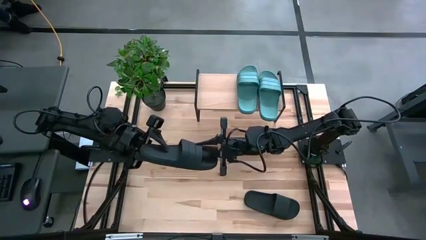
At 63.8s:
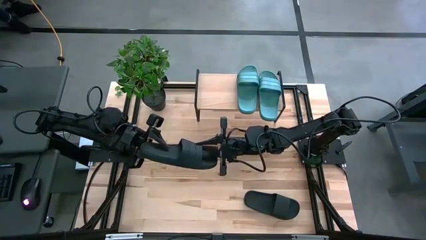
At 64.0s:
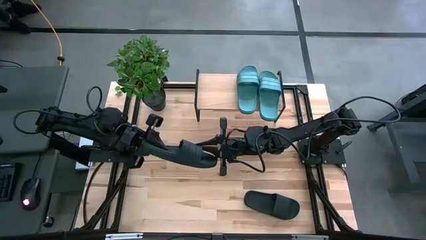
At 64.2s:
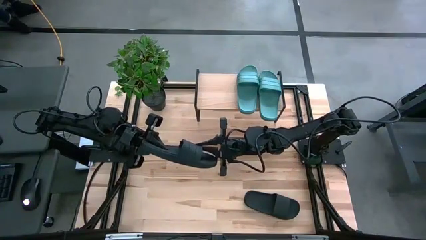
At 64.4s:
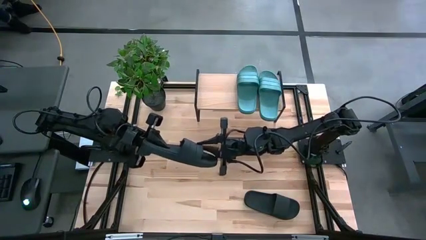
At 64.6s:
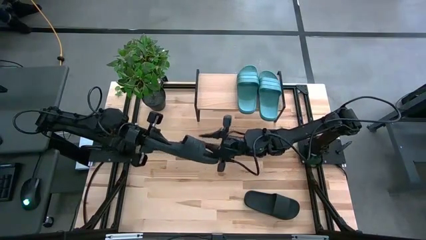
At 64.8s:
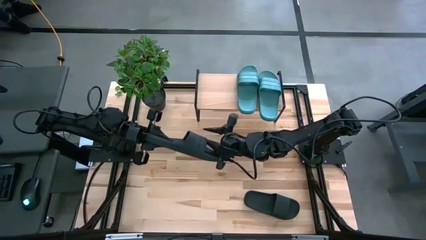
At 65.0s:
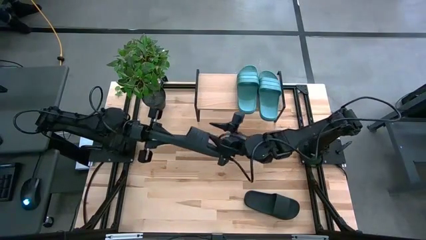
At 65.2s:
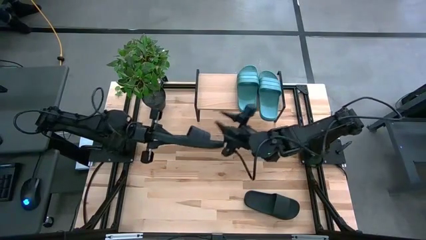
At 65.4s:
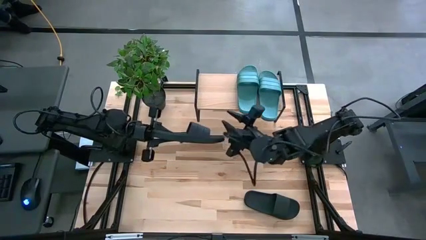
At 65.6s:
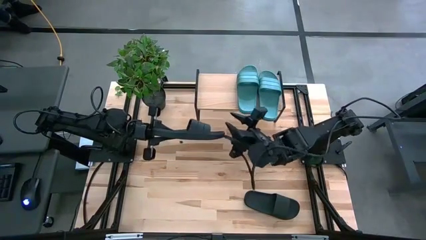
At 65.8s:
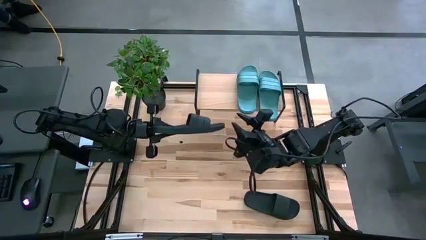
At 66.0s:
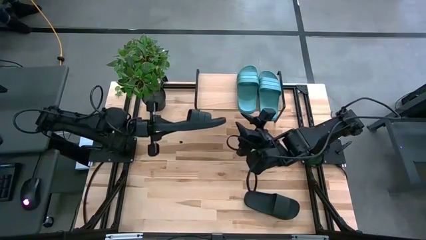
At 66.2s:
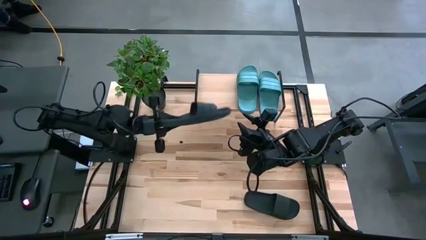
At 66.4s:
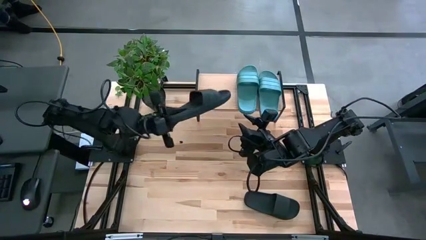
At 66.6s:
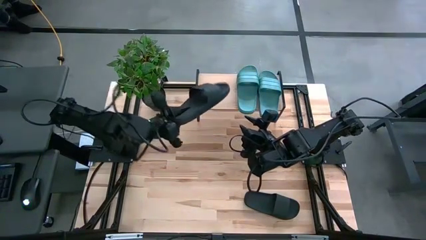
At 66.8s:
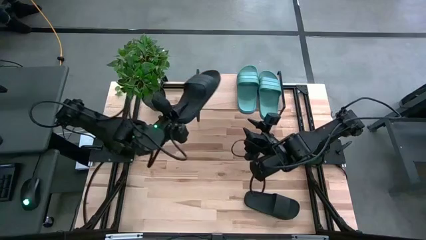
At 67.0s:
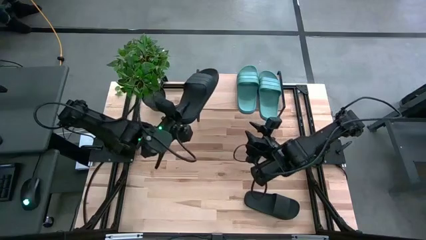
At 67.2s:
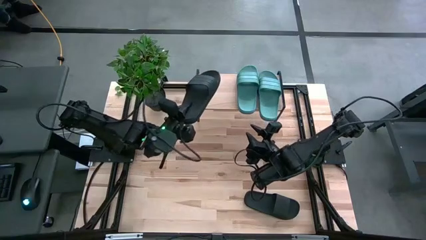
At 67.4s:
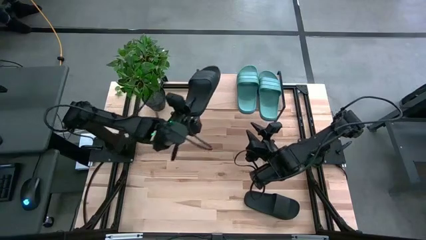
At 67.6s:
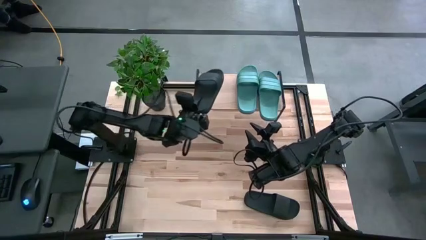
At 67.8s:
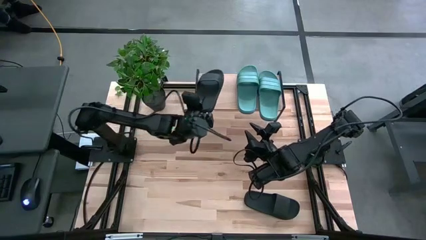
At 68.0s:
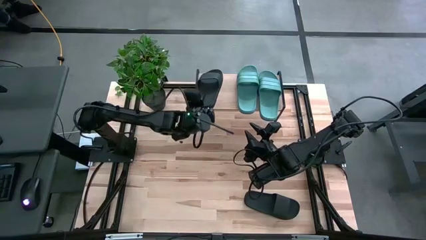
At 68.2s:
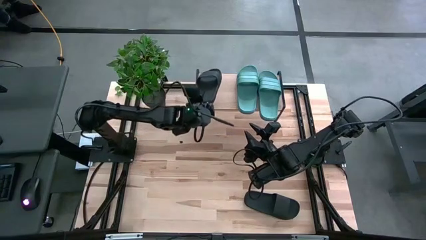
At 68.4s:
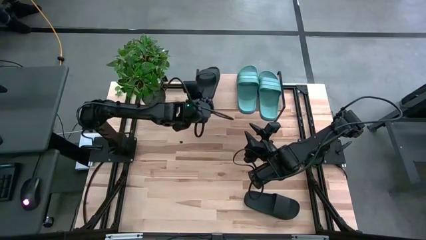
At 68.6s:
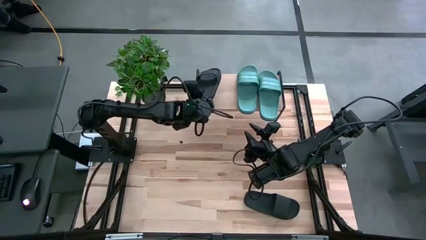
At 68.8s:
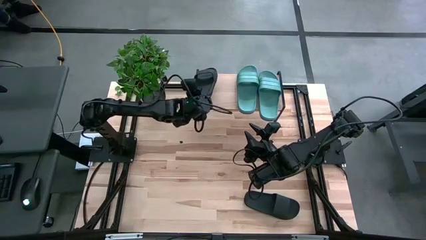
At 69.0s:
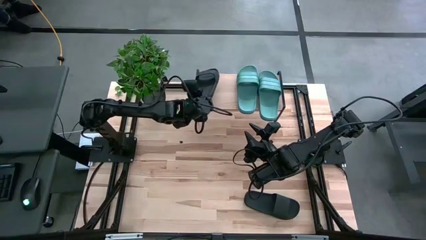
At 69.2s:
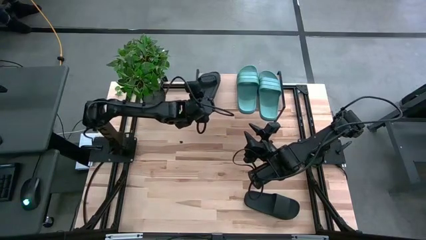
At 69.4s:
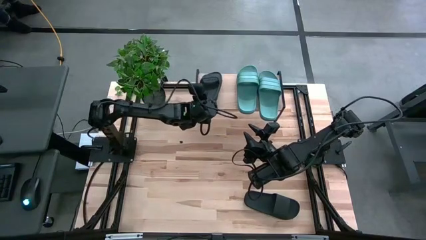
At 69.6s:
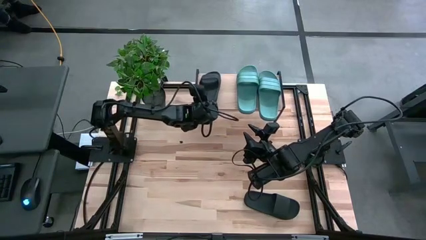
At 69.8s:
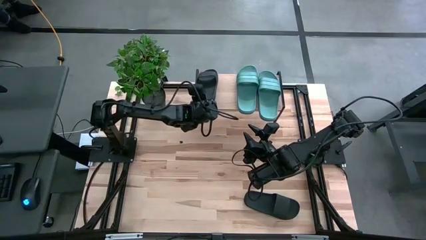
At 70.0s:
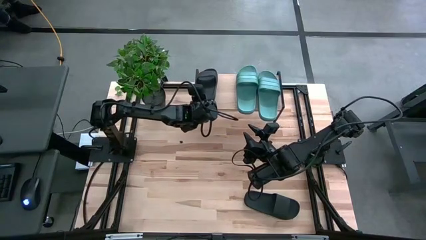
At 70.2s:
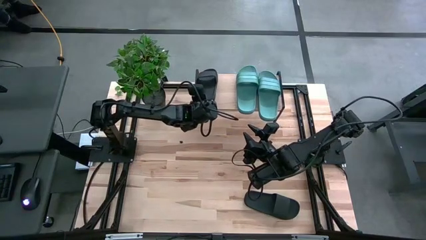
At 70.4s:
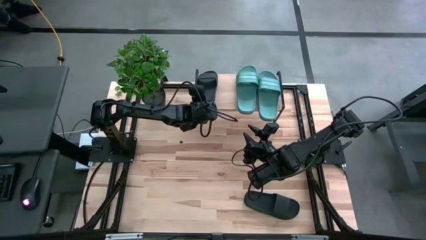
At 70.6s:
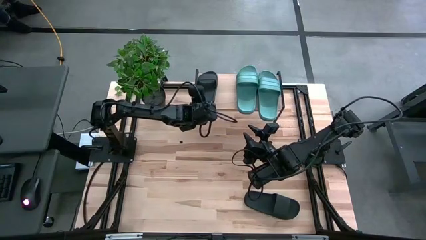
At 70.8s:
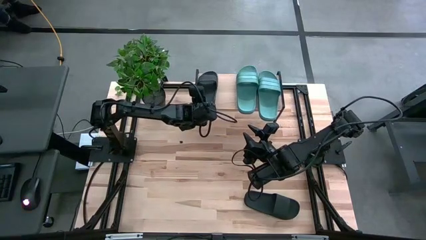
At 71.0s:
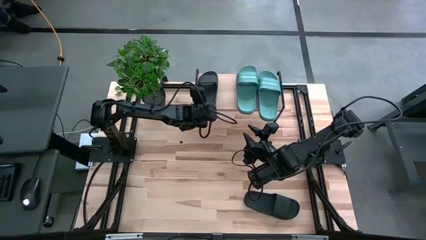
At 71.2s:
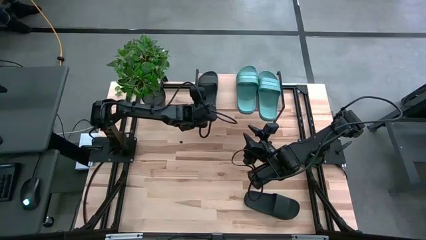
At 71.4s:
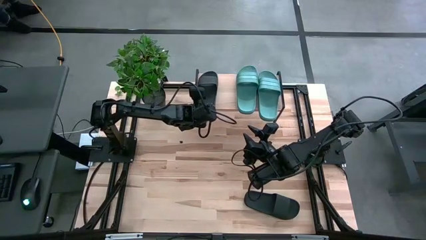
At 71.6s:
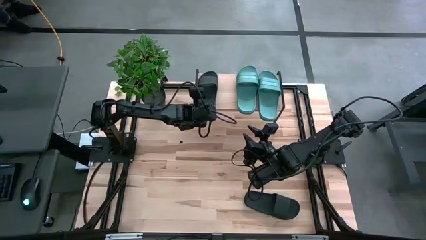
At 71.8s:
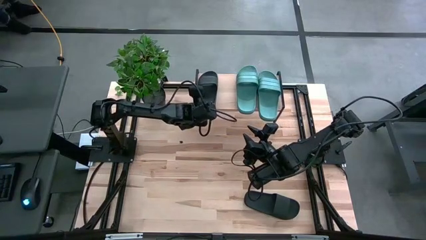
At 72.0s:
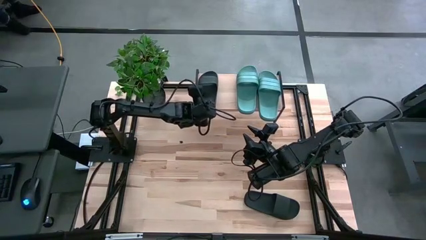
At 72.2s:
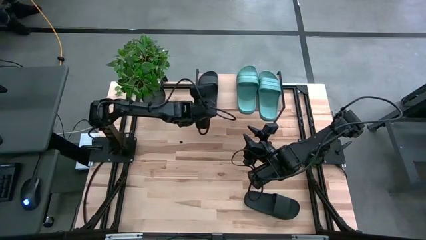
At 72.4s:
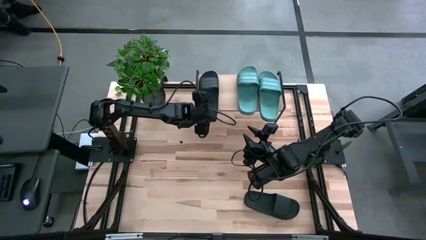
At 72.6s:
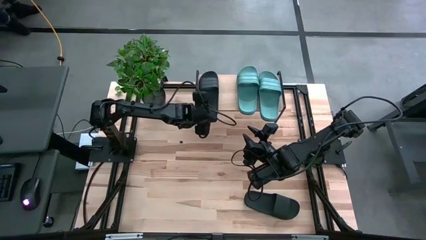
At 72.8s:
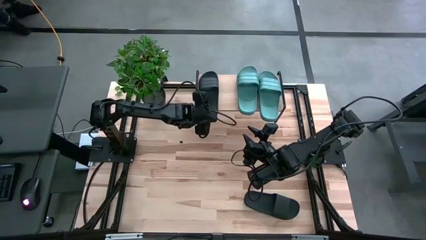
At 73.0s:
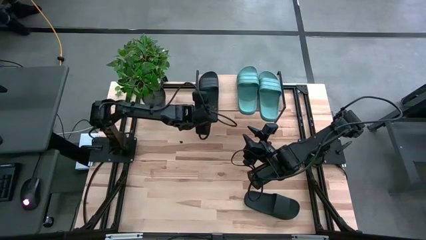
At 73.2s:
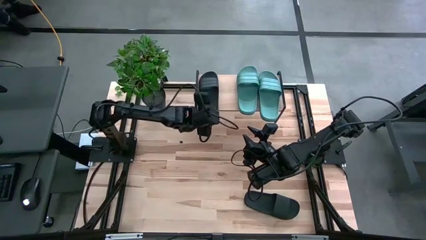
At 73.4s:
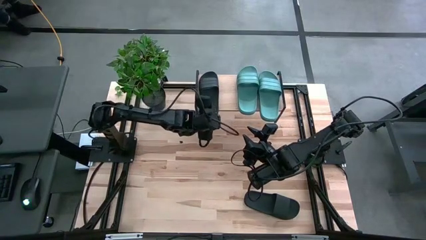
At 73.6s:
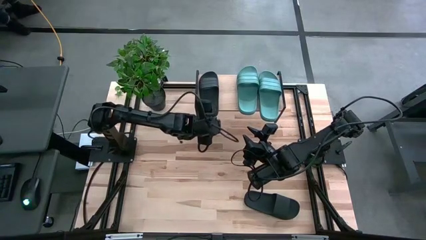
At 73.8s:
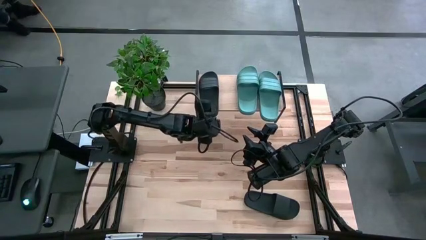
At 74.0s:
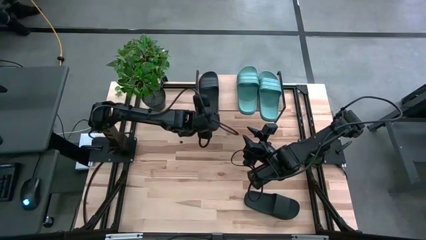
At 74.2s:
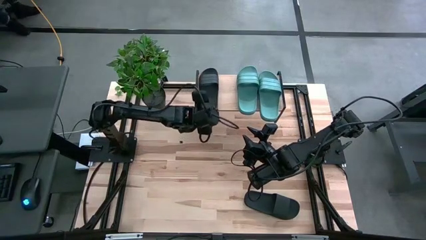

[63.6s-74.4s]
Task: Pick and place slides into the shelf
Put the top black slide on the shelf
